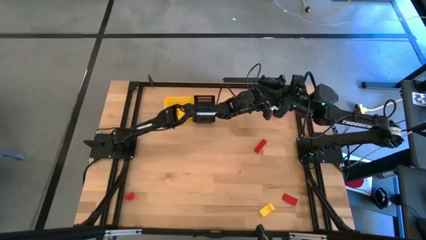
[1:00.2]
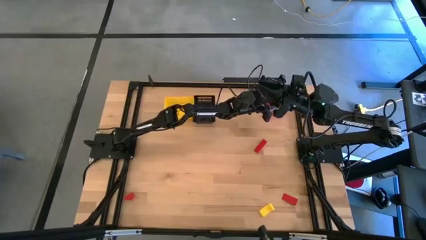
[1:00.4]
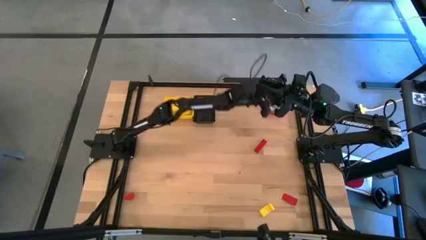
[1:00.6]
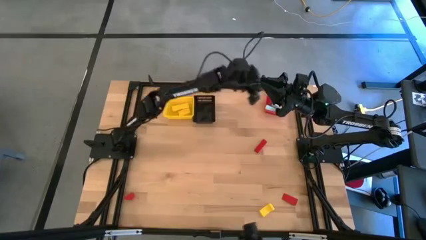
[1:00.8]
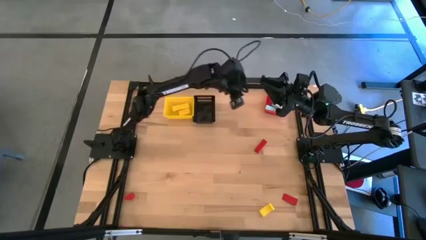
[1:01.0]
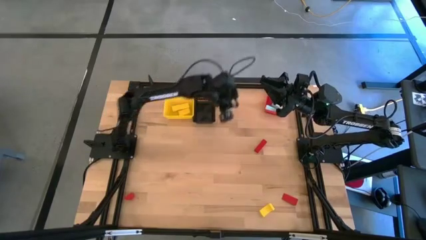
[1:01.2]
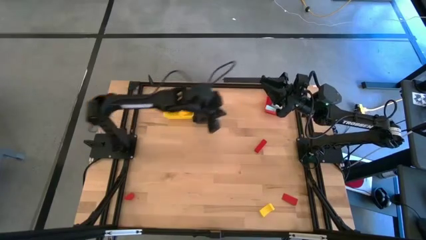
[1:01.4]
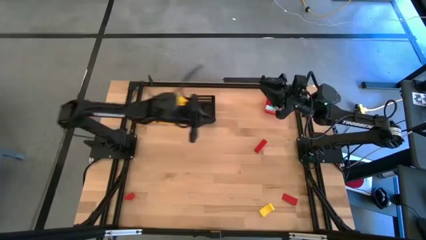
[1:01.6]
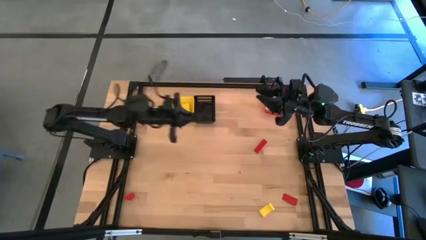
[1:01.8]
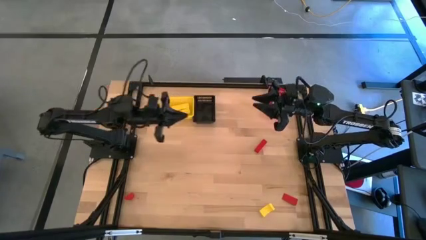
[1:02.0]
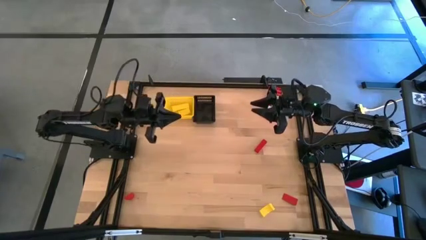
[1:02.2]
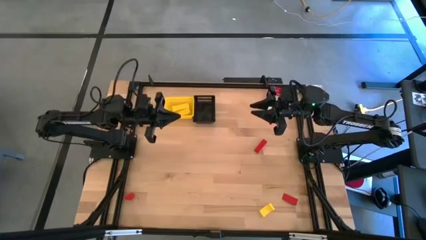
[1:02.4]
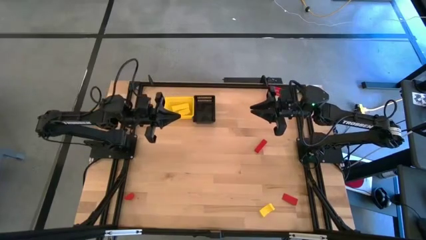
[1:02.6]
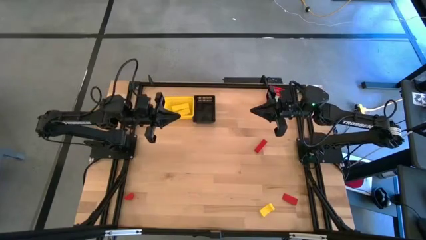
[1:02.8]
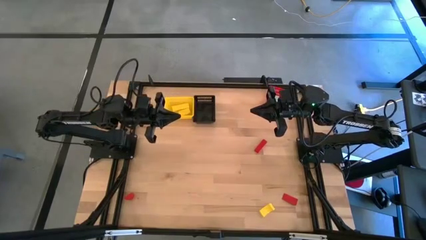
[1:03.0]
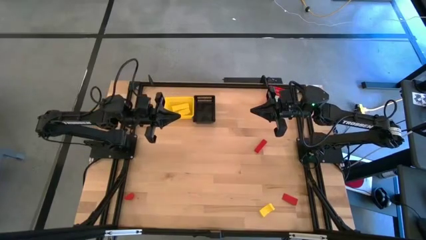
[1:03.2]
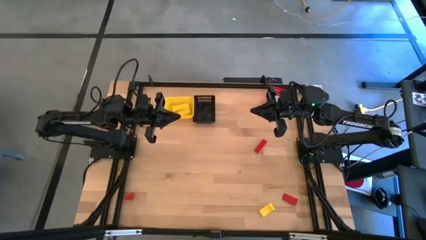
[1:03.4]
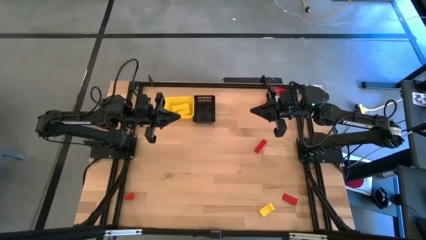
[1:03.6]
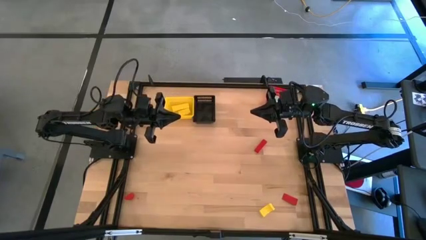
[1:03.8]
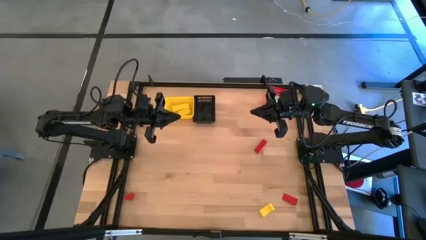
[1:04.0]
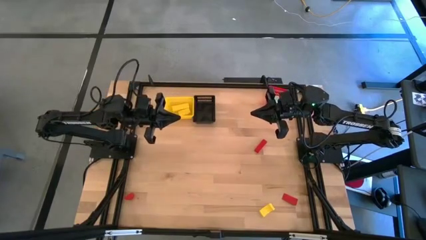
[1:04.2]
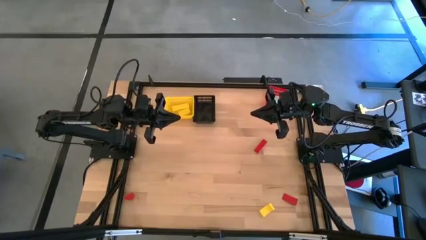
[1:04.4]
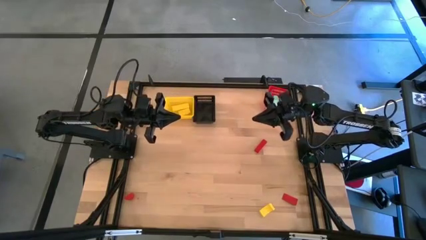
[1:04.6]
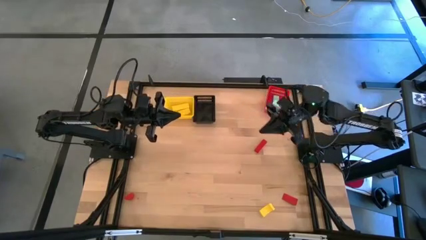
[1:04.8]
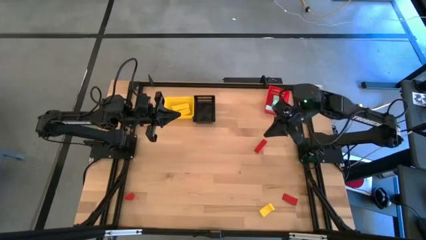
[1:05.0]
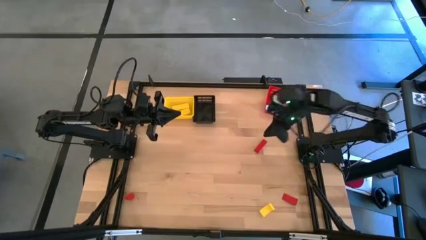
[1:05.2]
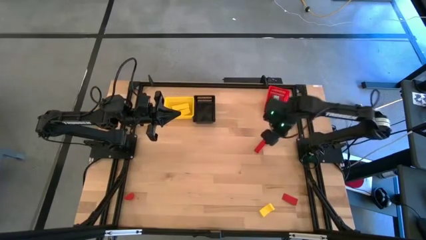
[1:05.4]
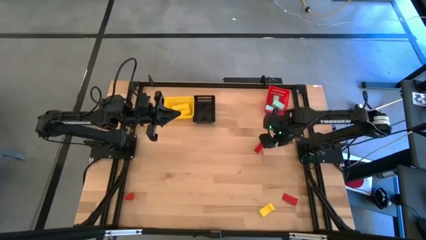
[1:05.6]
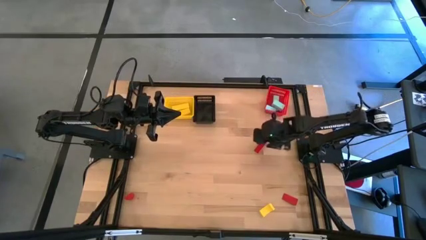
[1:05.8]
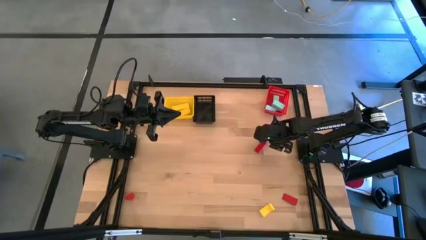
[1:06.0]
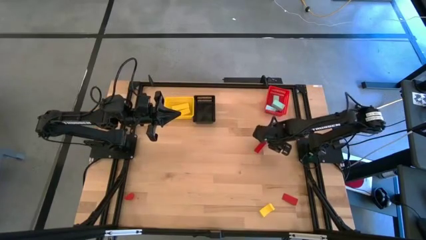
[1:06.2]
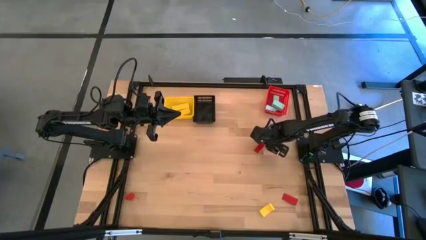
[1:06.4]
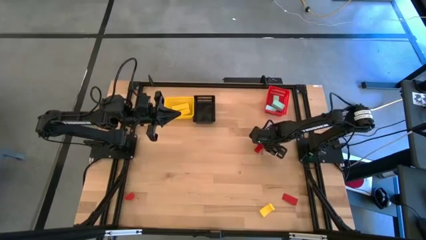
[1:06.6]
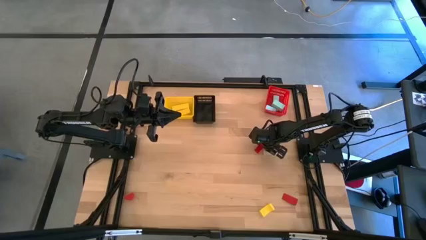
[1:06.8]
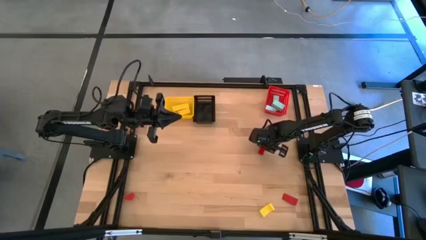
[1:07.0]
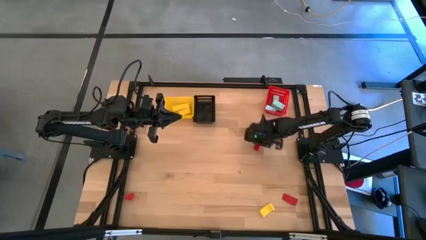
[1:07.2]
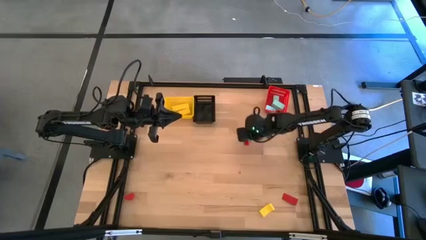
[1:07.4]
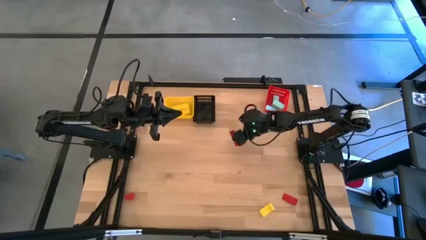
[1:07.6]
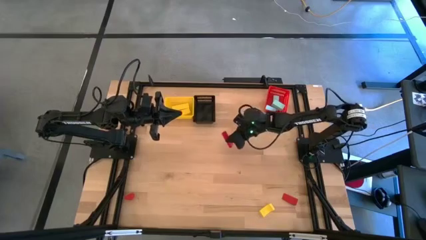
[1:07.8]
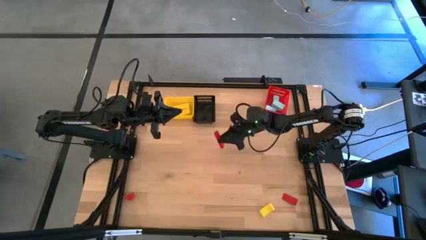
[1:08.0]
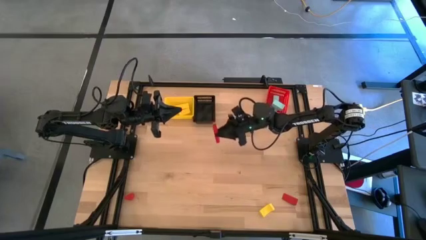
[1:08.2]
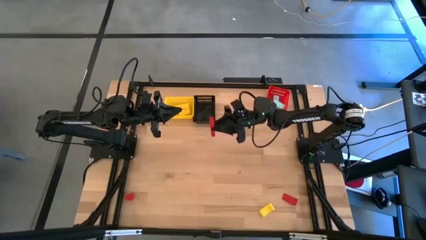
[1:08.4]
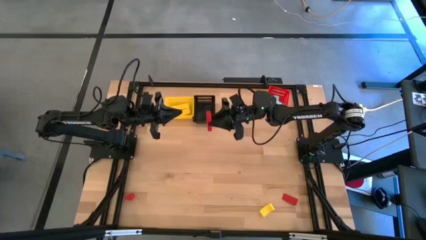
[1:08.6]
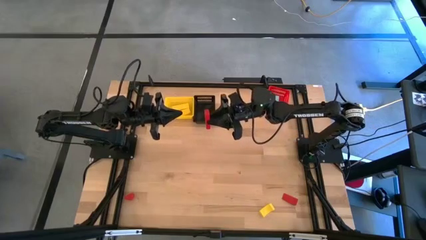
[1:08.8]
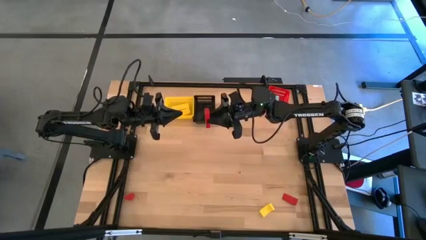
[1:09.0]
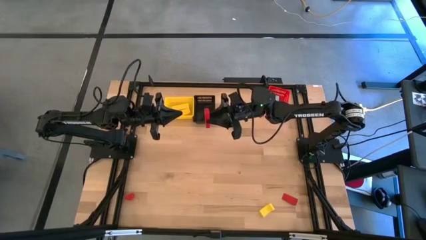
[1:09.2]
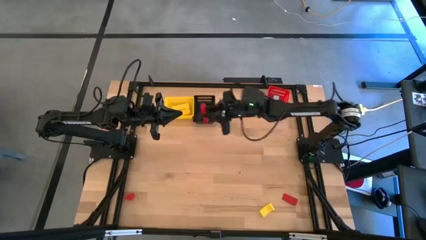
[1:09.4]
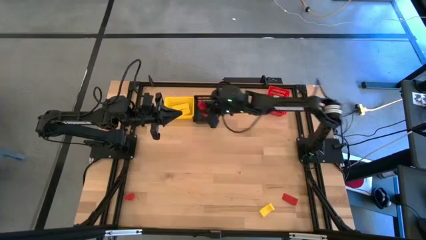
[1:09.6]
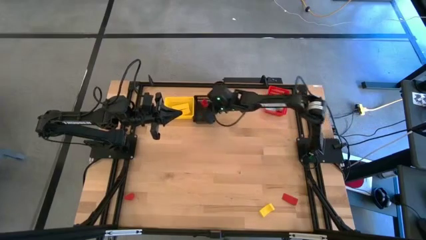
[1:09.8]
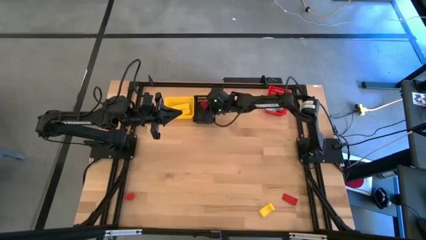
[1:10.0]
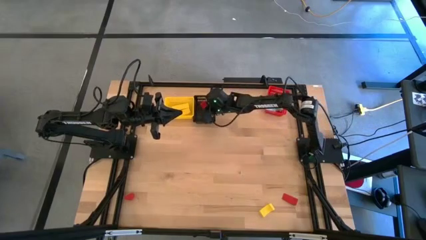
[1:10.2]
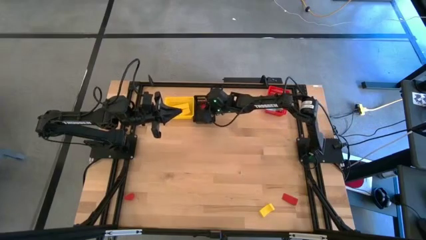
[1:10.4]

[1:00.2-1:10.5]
Task: Sort & place blocks by color
Put the top red block into the black bin

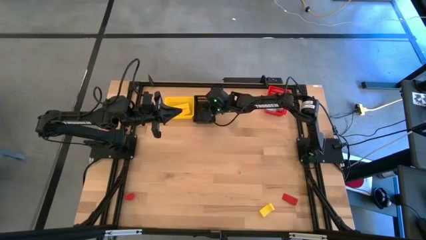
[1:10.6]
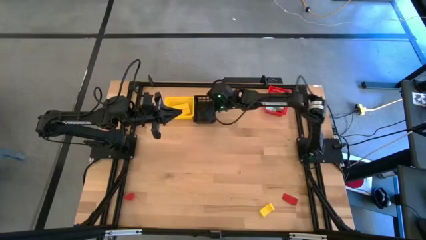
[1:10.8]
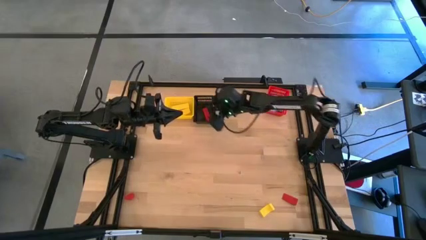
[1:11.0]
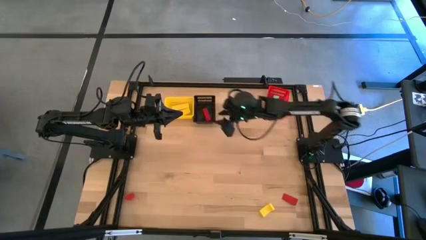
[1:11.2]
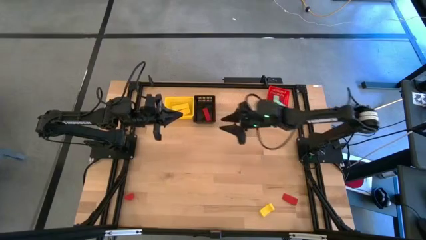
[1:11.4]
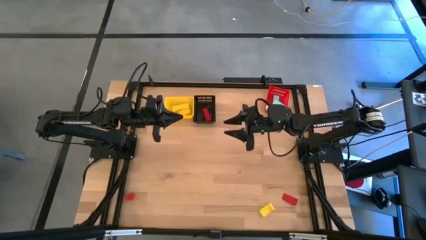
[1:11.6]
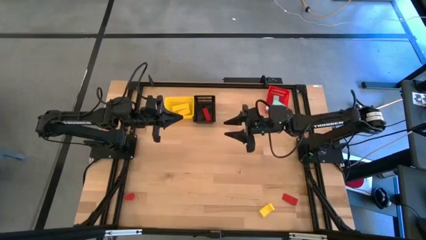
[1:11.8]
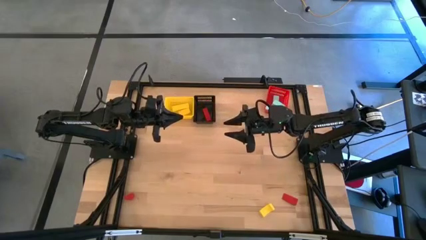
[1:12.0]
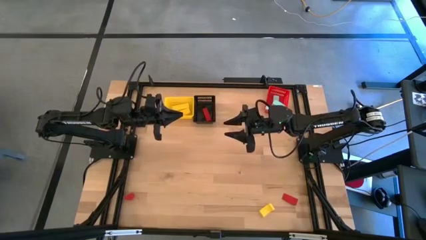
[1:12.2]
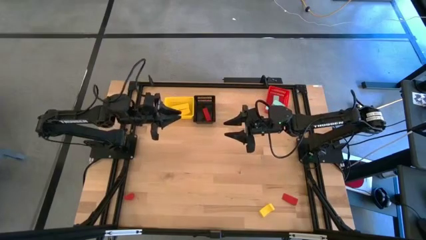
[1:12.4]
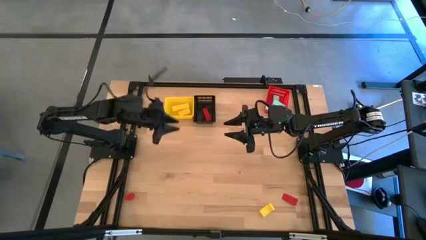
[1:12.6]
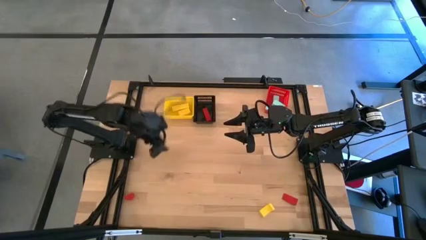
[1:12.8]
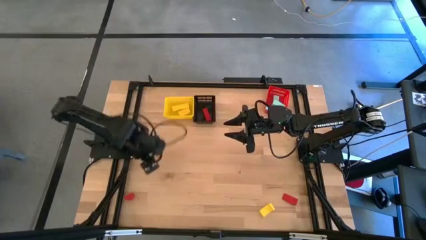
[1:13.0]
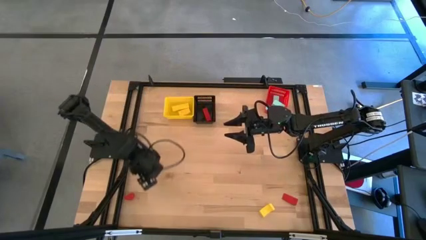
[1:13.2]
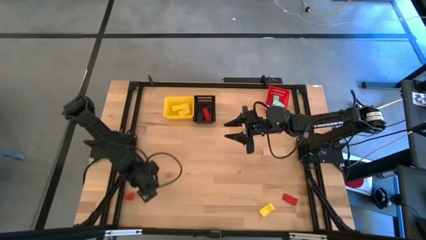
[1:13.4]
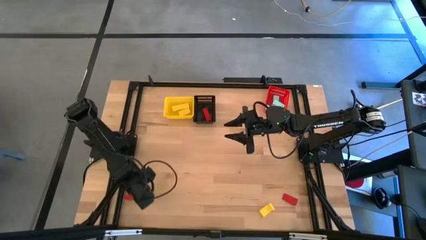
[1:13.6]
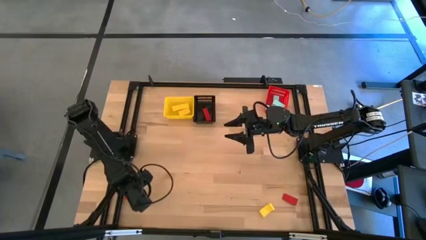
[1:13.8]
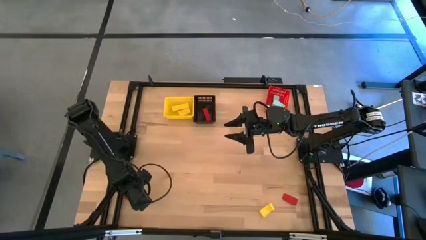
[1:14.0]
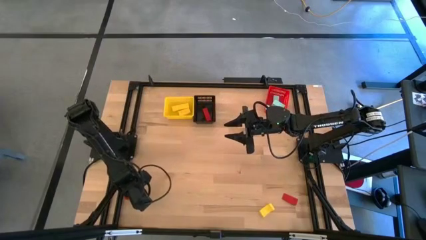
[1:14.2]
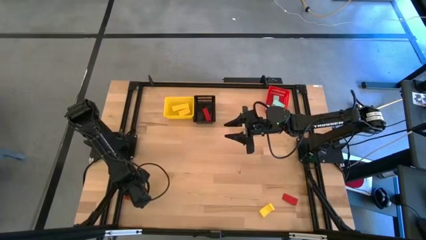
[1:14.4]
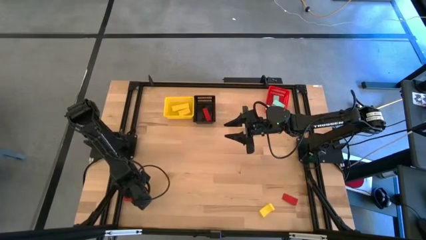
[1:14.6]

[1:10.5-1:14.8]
Put the left red block into the black bin
